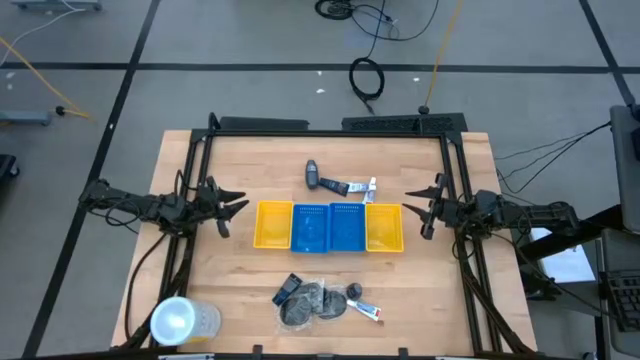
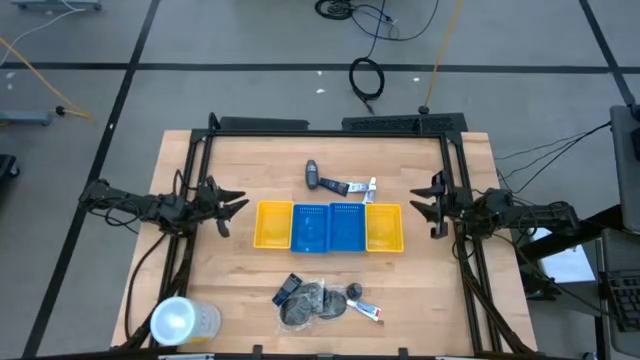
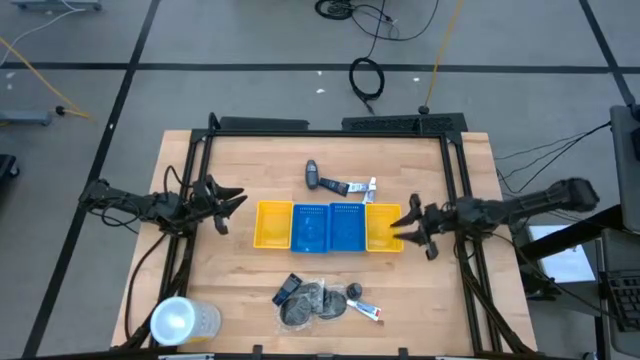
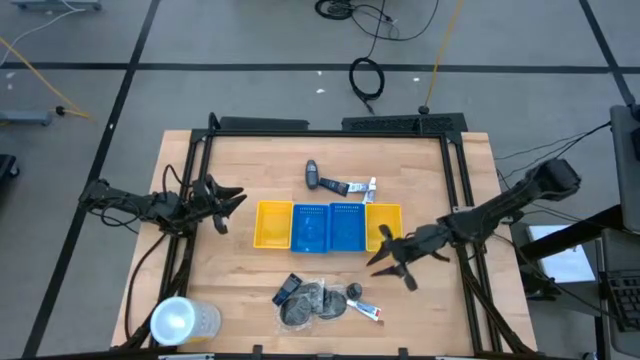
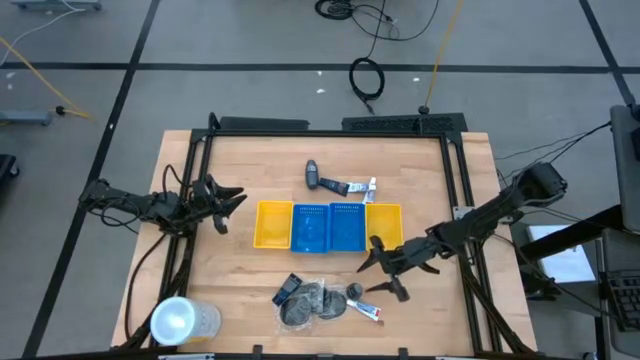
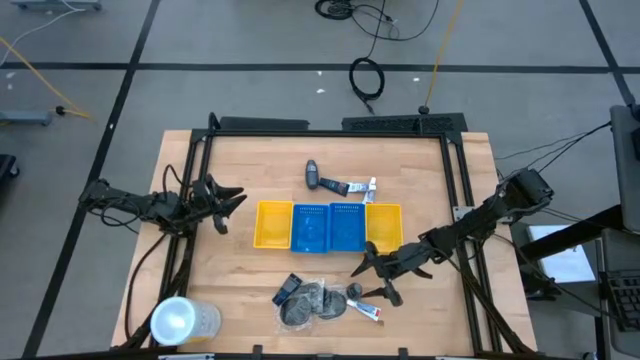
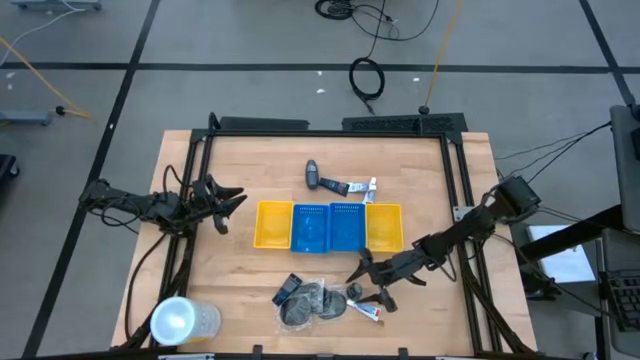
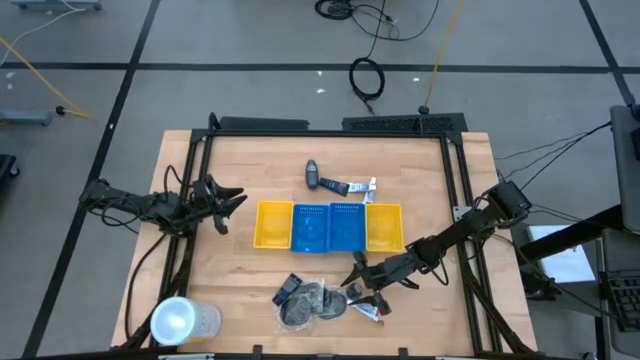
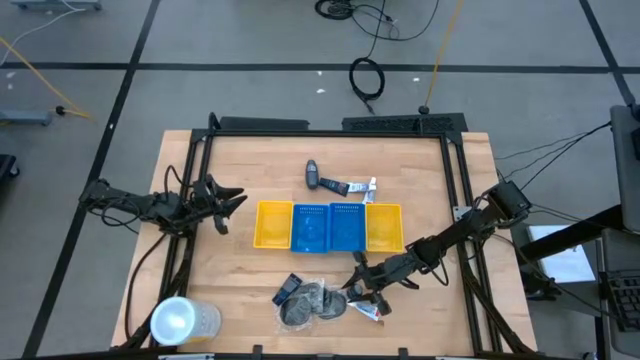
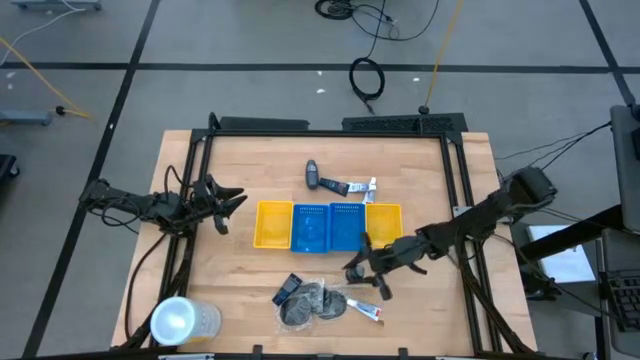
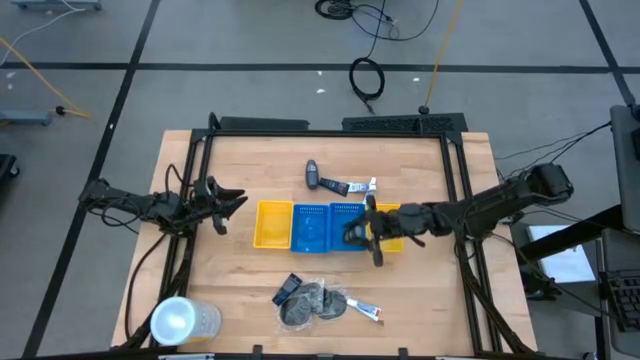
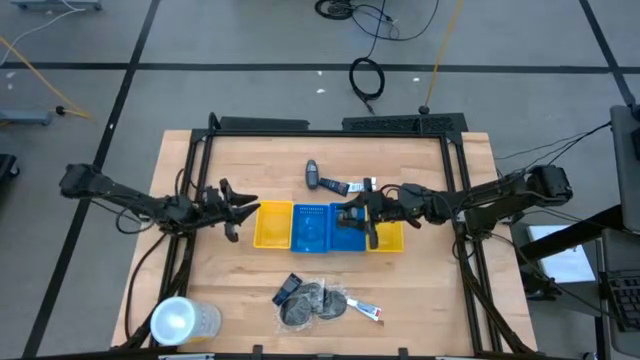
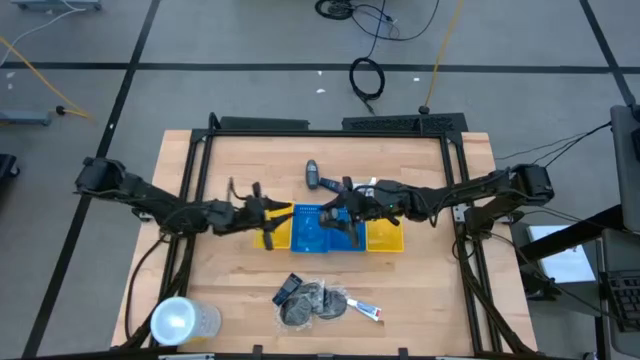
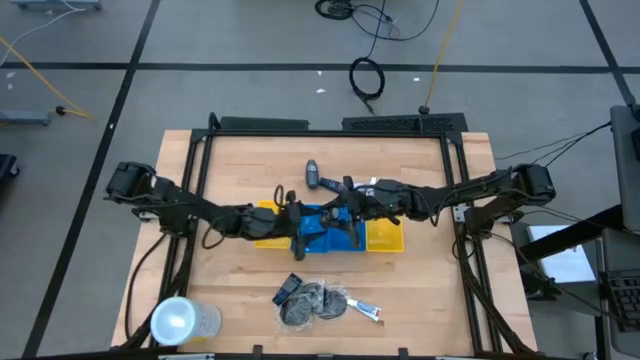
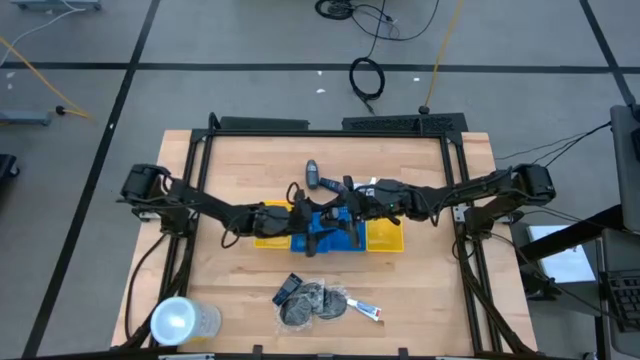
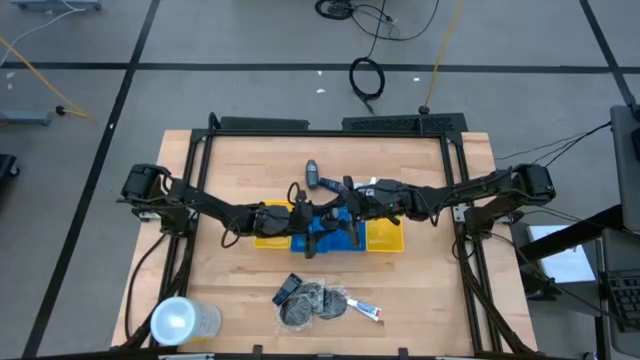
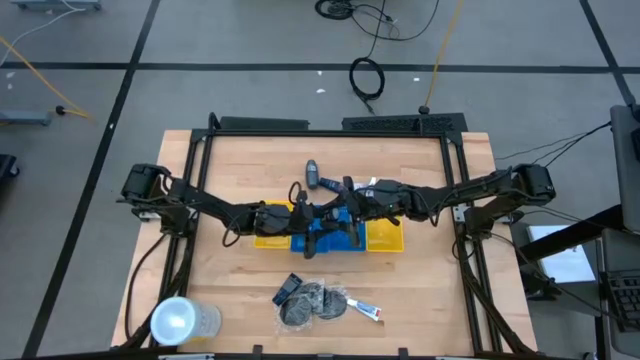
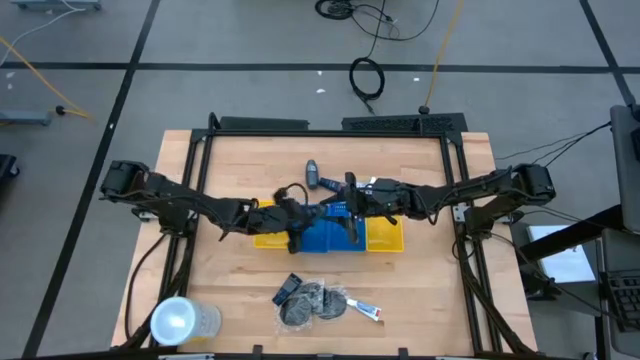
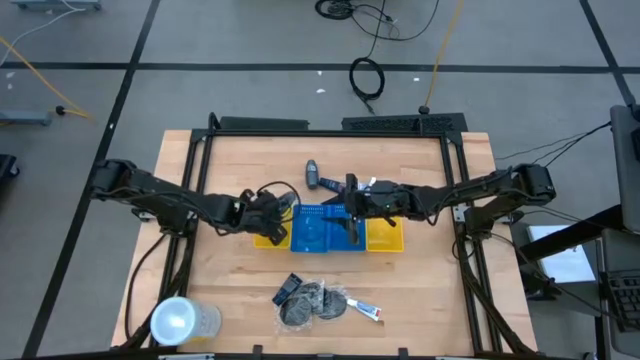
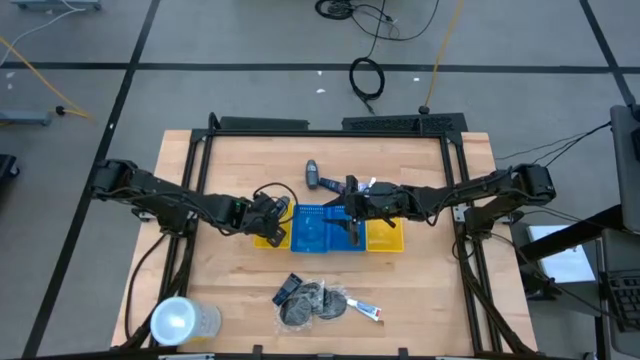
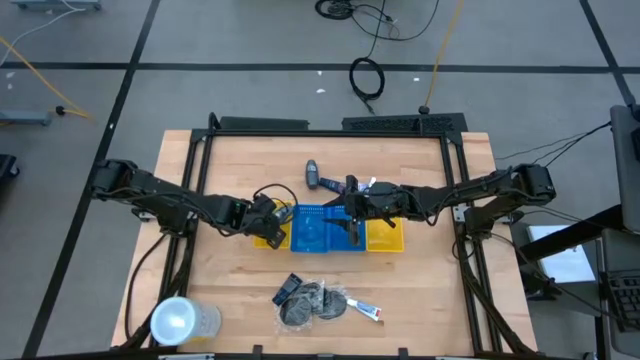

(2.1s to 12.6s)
Task: Pick & Place Travel size toiletries
Put the black deodorant into the left yellow basket

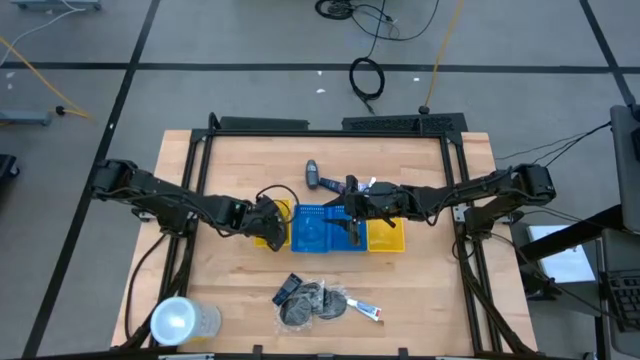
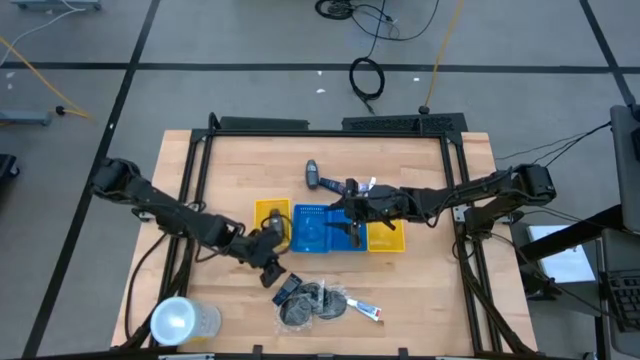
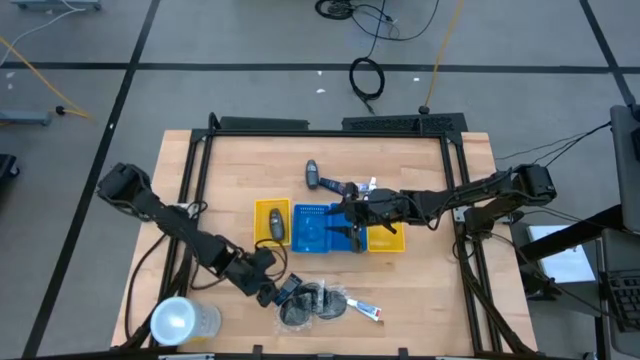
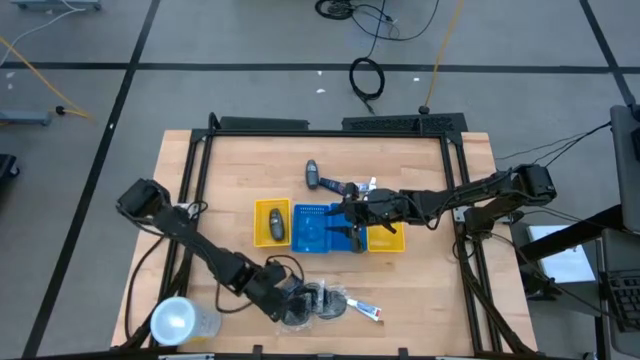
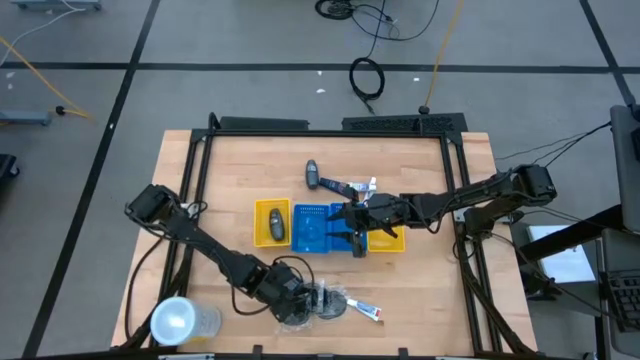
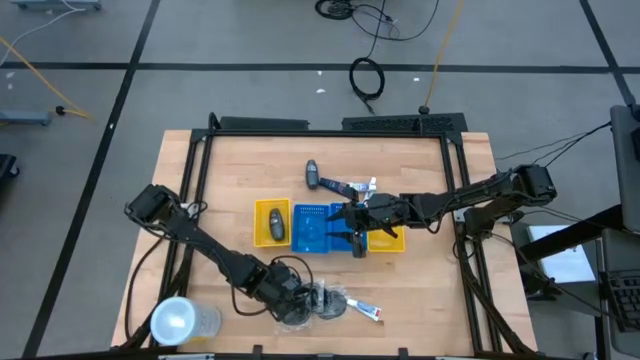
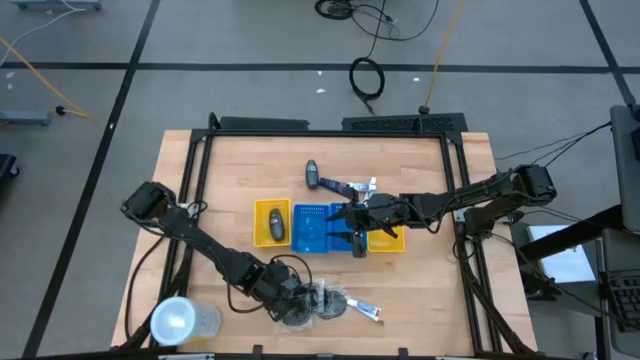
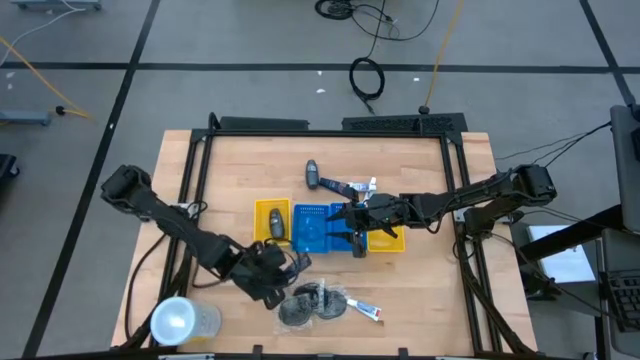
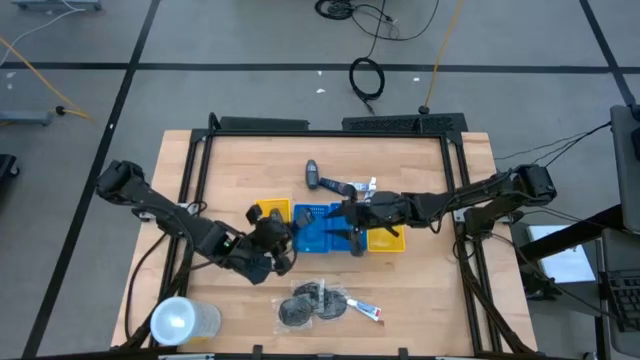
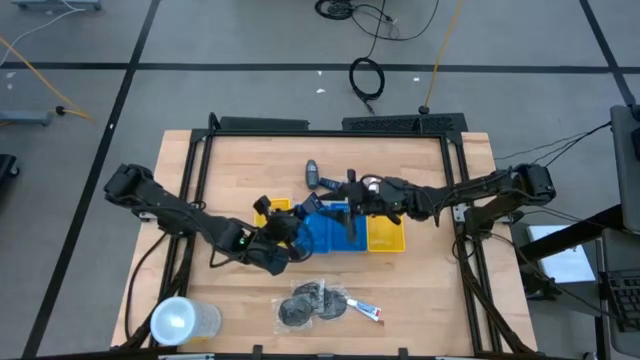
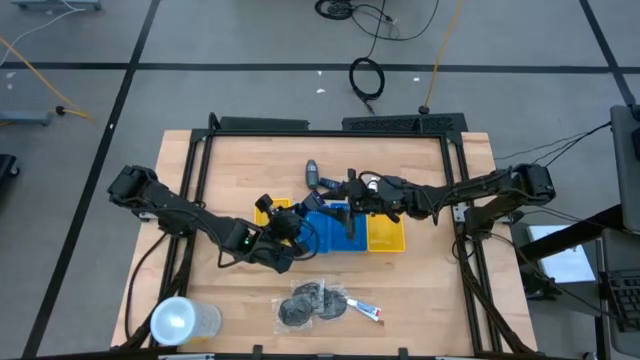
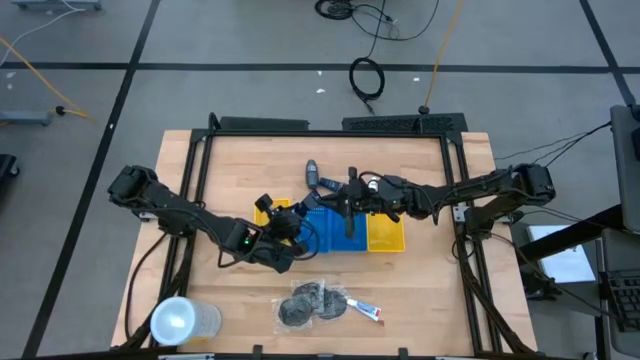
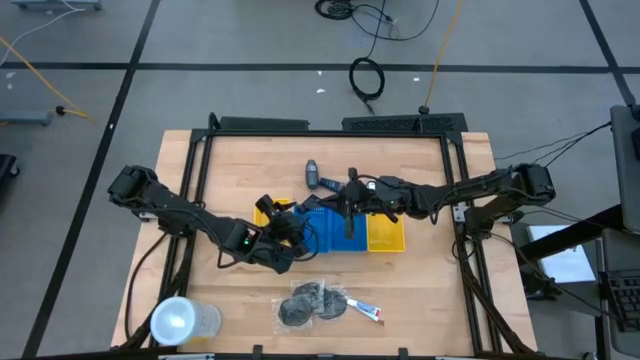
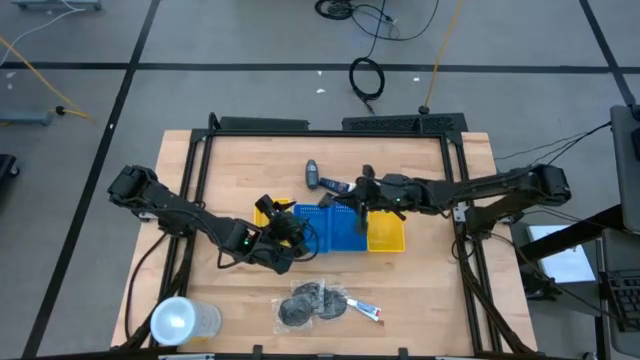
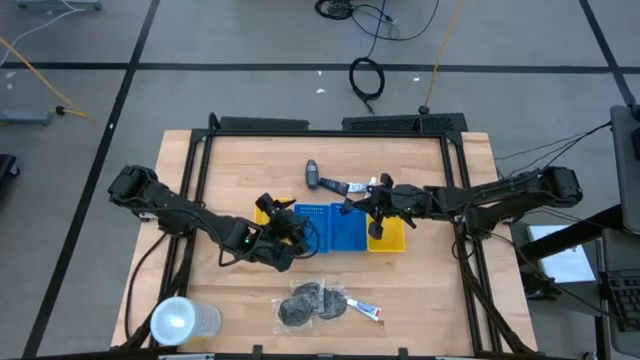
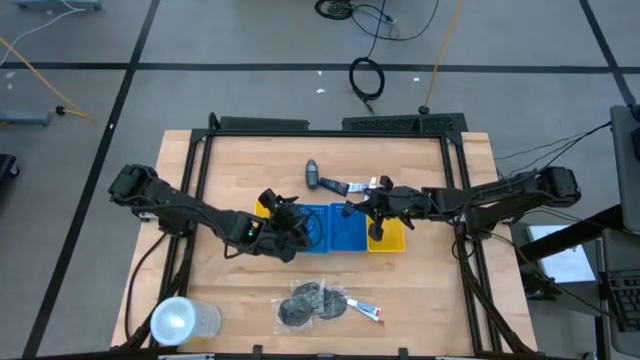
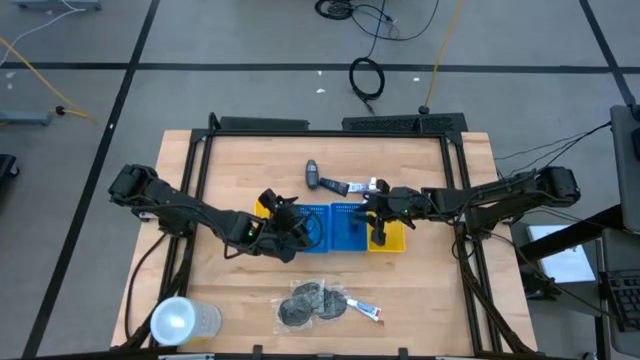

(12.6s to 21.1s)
Put the blue shaving cream into the right blue basket

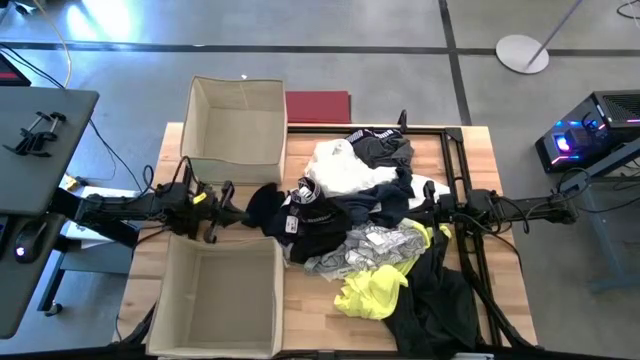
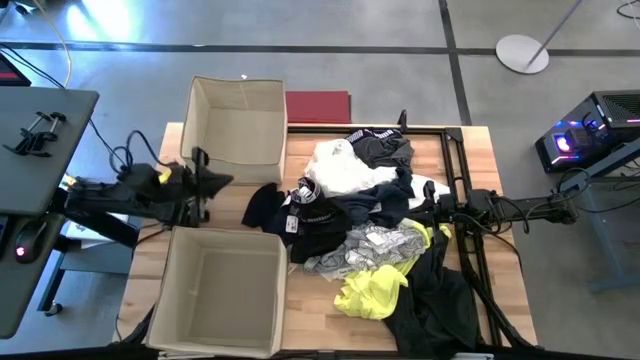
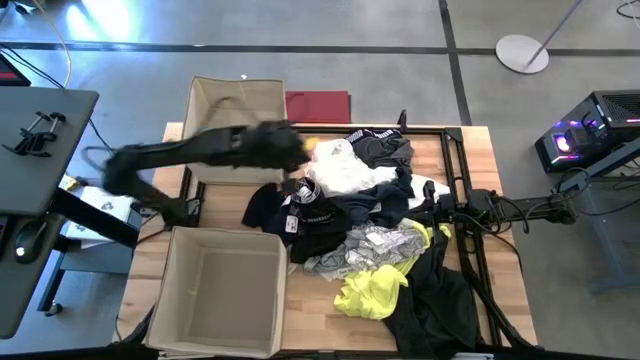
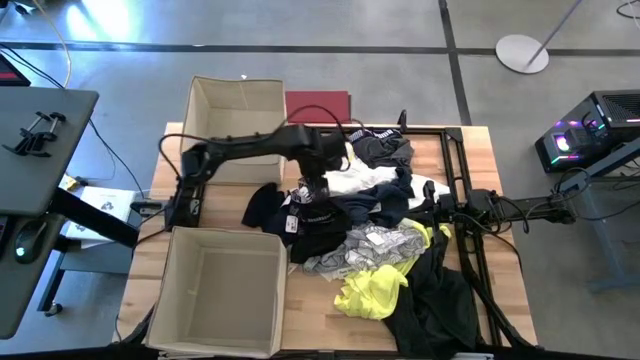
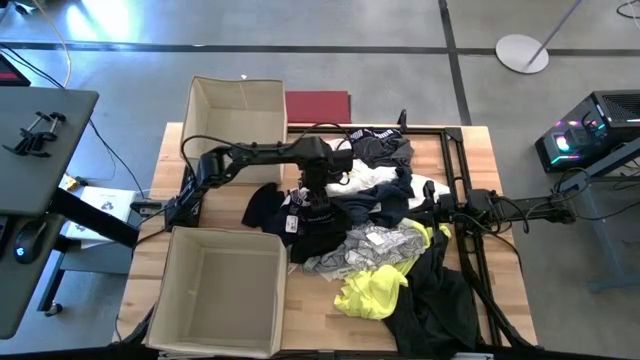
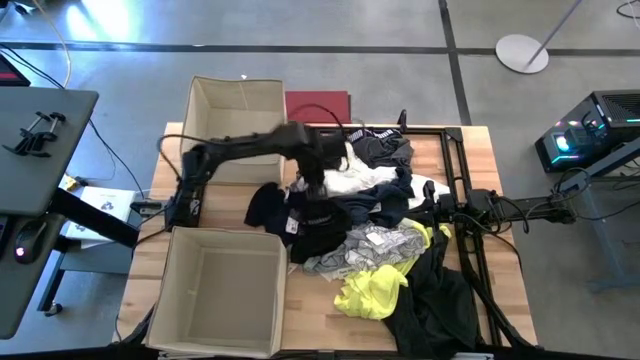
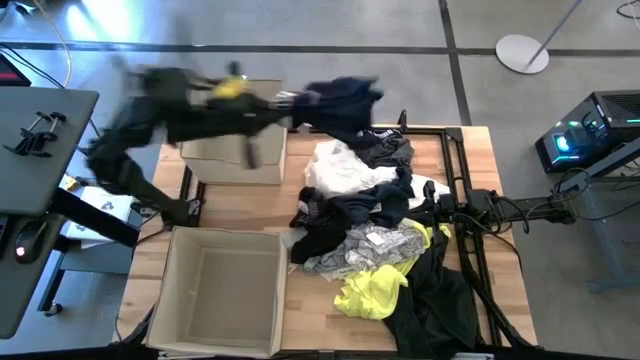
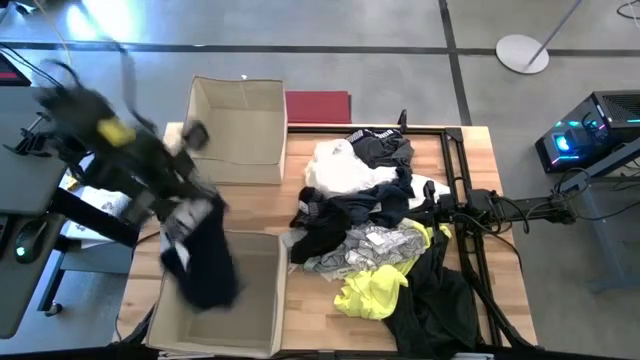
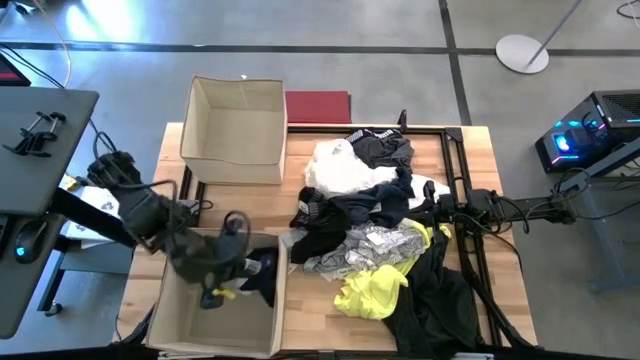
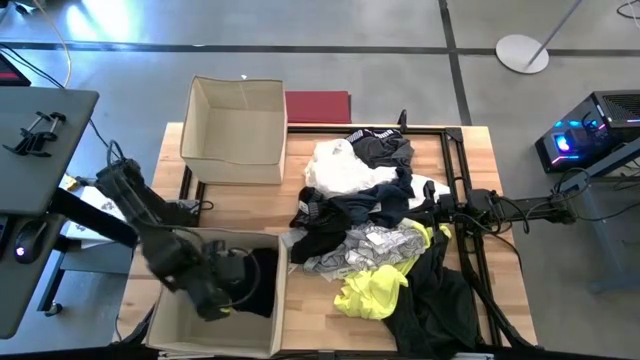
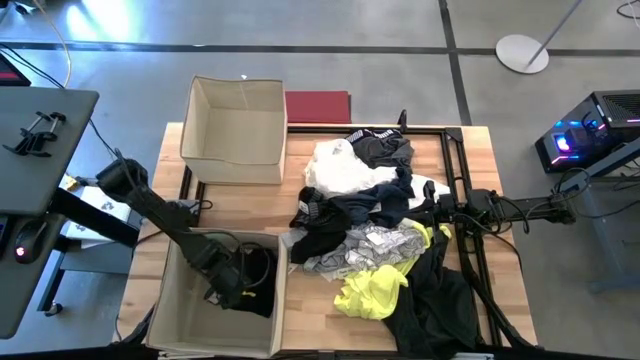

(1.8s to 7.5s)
Task: Sort clothes
Put the right black boxer into the bottom laundry organizer
